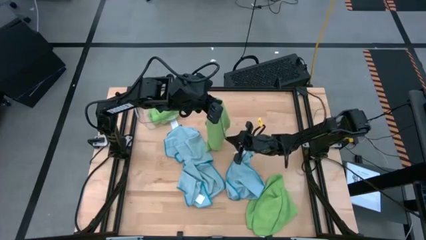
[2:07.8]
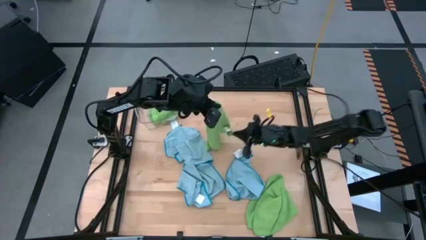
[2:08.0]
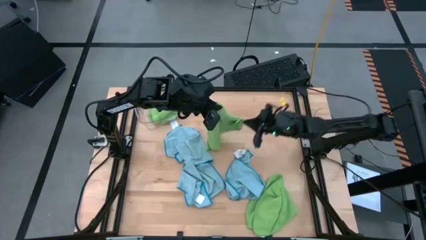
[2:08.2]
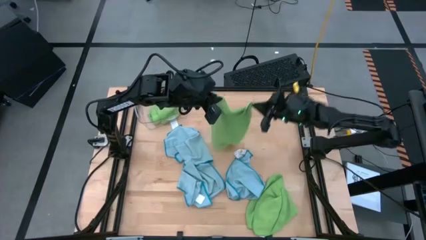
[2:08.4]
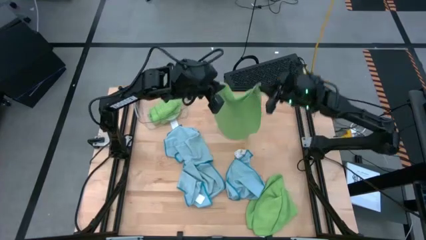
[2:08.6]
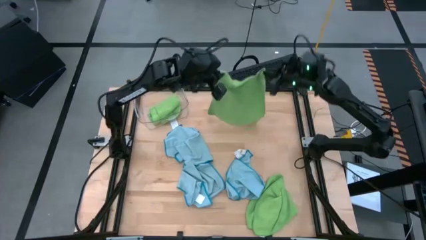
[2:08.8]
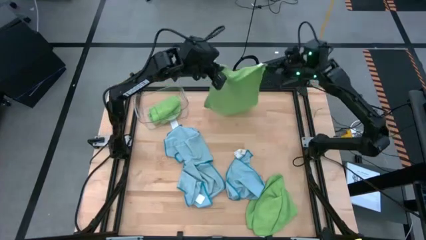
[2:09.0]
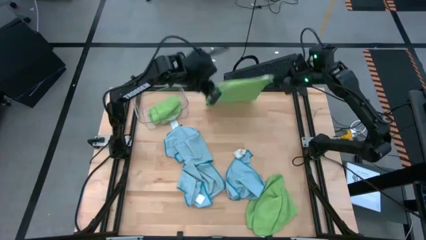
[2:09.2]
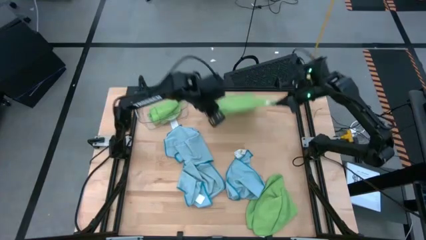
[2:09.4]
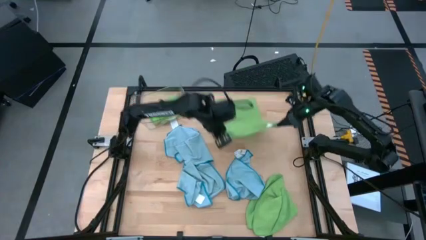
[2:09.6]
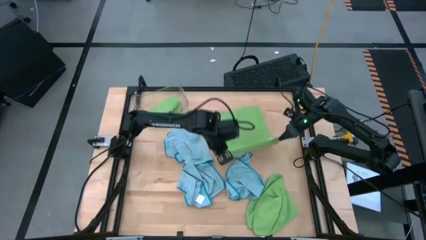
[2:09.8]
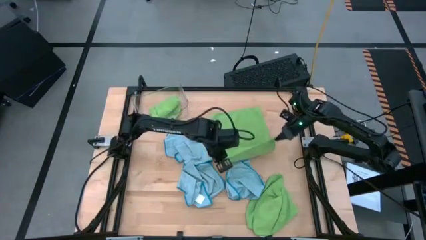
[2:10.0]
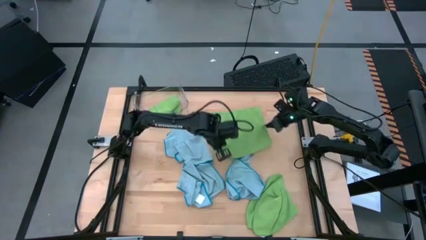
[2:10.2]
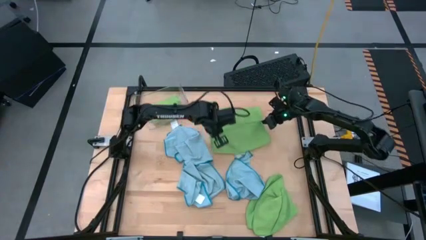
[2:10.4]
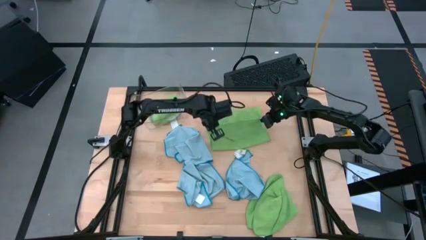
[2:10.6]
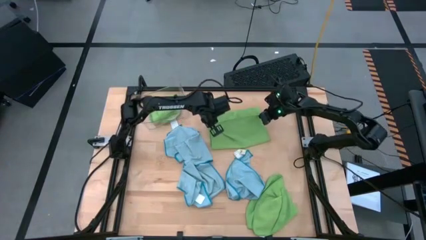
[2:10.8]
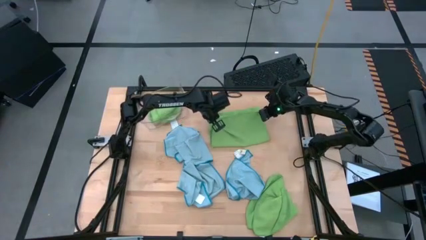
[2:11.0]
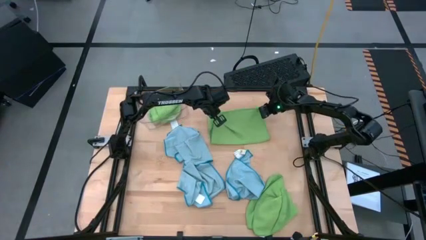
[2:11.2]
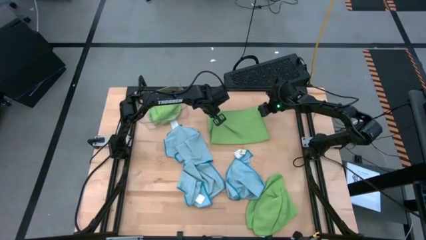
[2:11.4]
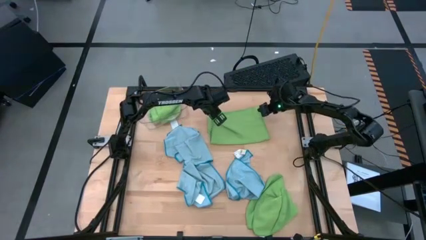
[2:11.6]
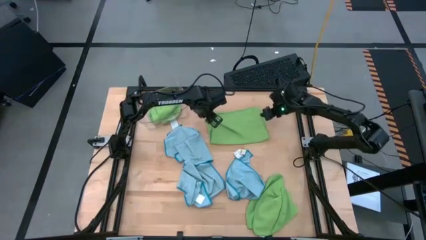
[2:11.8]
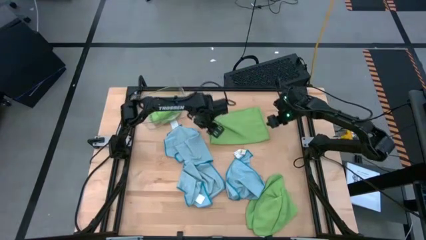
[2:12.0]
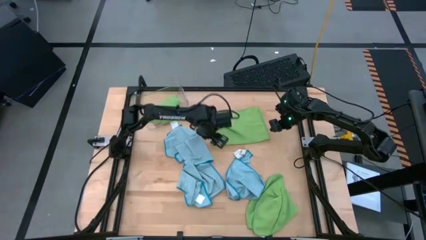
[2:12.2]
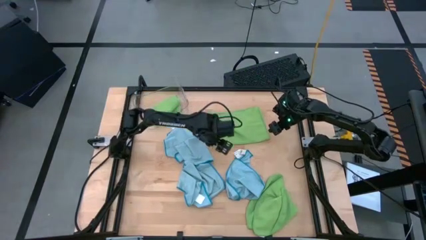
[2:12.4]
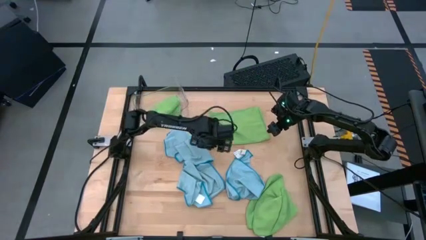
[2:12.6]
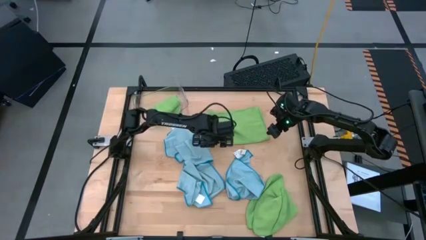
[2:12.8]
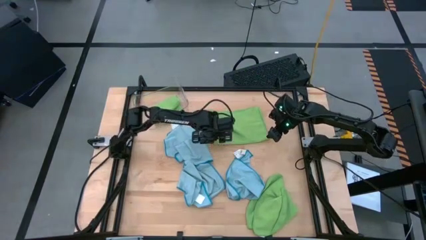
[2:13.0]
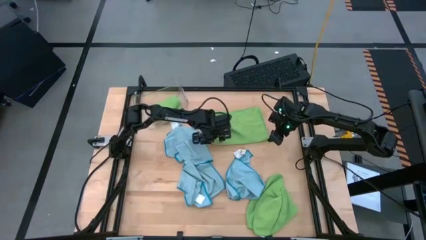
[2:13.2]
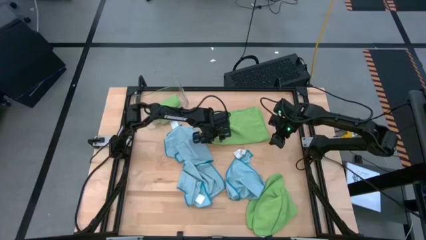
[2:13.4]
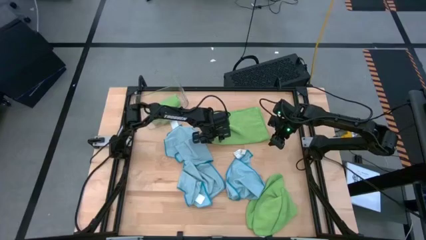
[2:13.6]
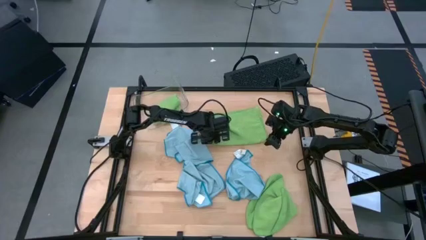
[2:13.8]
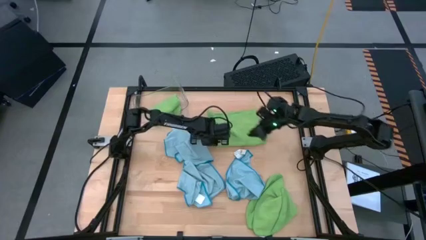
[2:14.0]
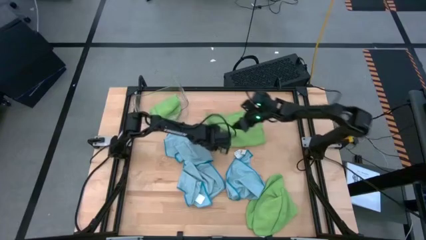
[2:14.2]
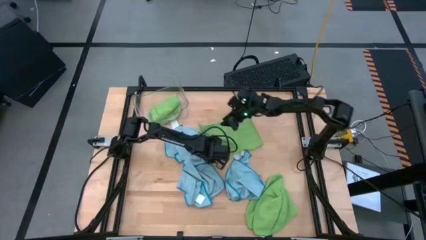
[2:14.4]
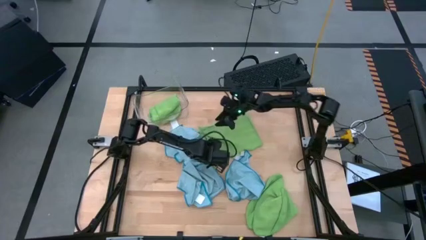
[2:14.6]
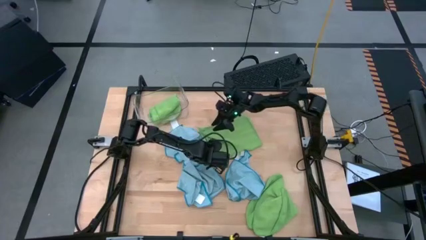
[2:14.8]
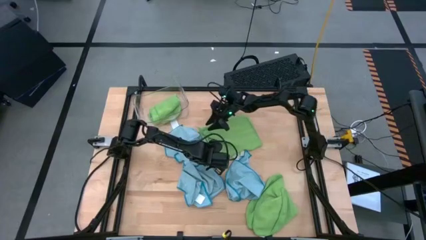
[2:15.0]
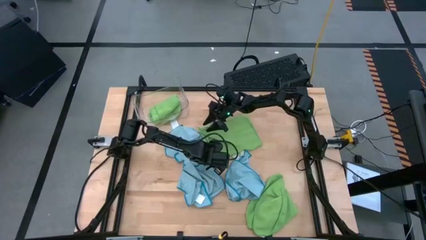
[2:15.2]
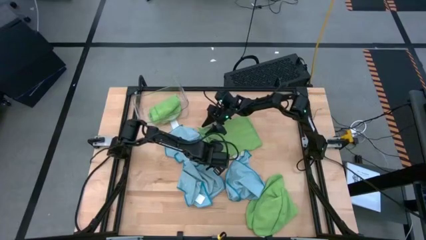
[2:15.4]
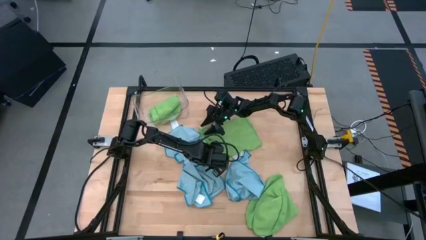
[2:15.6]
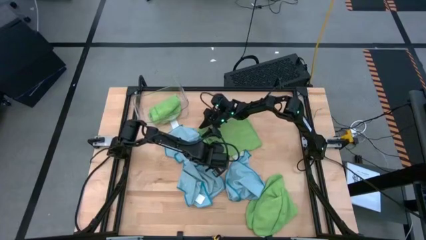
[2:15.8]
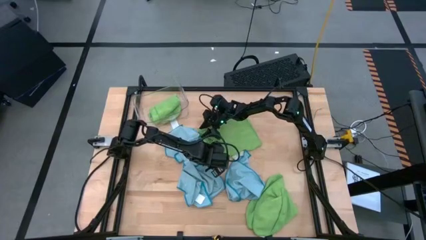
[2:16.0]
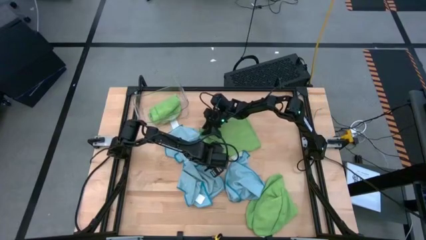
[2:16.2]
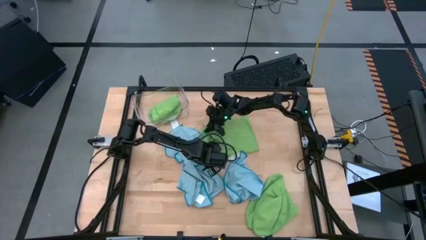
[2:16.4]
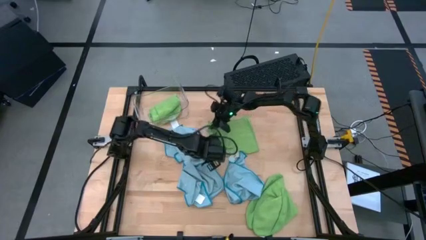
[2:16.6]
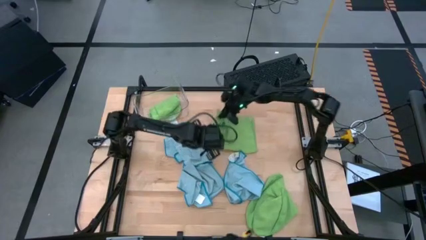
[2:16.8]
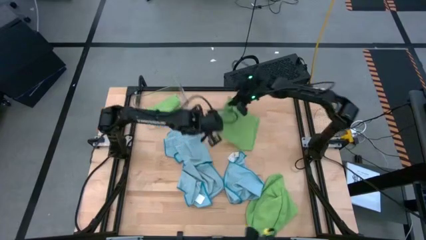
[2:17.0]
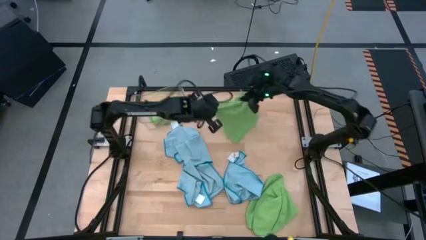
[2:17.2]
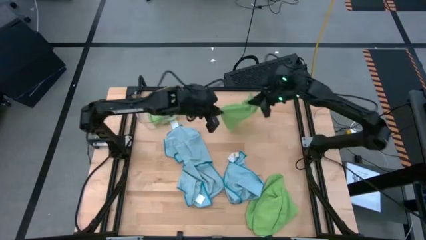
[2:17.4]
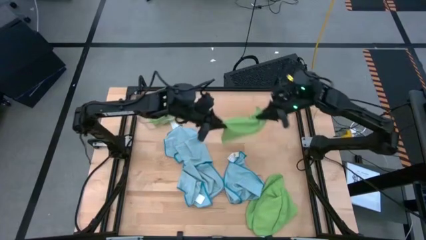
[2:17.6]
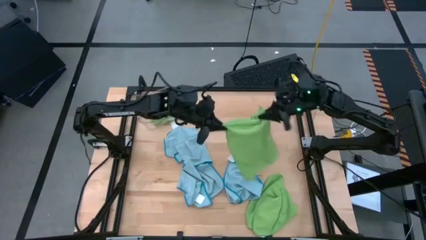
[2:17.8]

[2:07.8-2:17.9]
Task: Fold microfiber towels
Fold the left green microfiber cloth

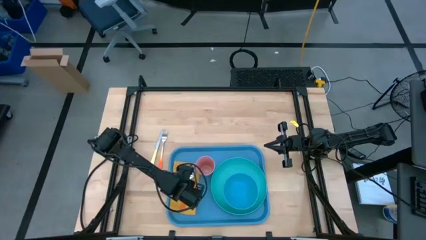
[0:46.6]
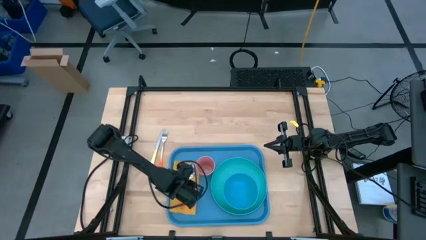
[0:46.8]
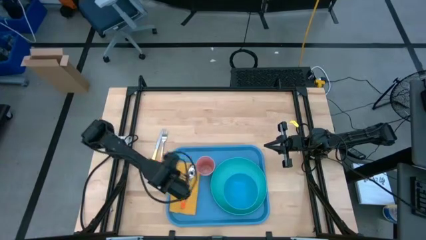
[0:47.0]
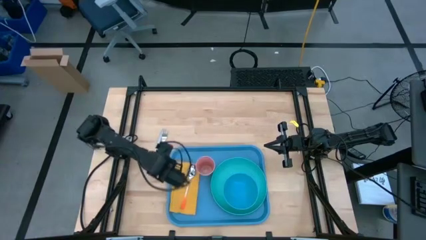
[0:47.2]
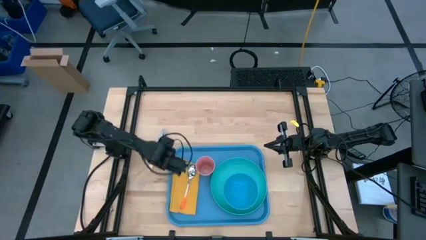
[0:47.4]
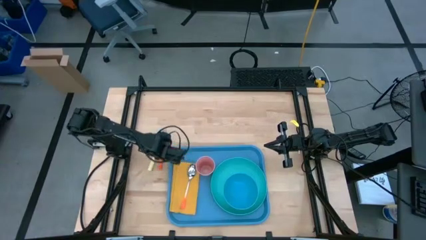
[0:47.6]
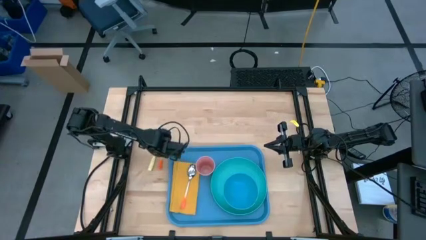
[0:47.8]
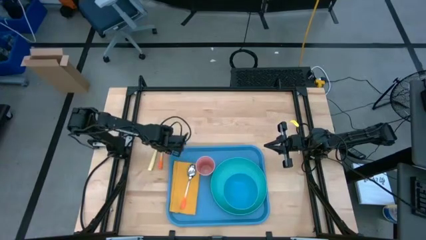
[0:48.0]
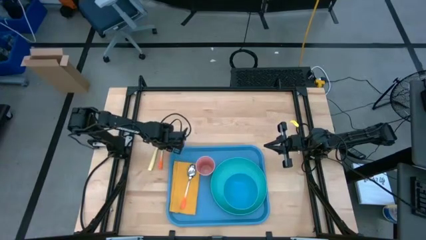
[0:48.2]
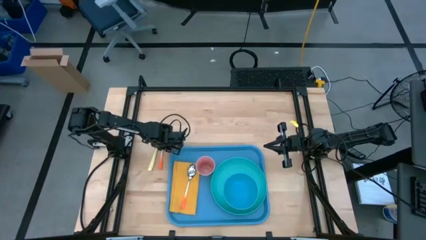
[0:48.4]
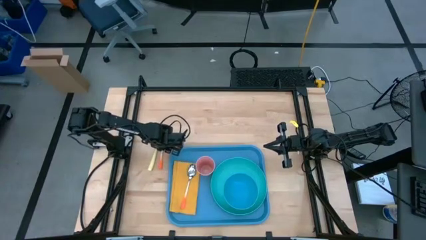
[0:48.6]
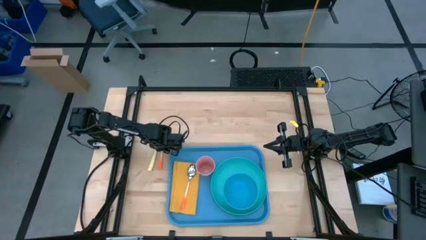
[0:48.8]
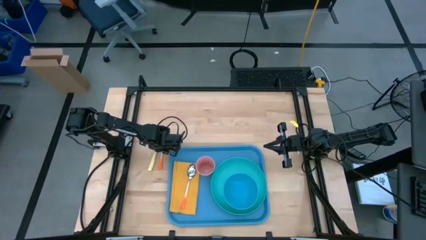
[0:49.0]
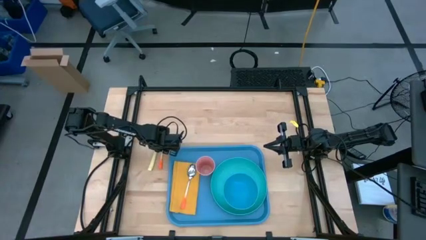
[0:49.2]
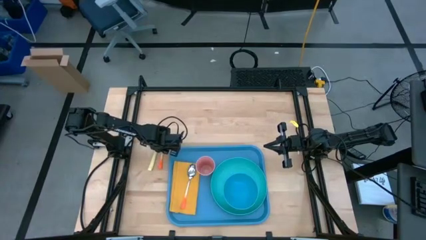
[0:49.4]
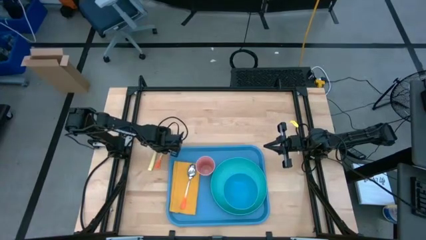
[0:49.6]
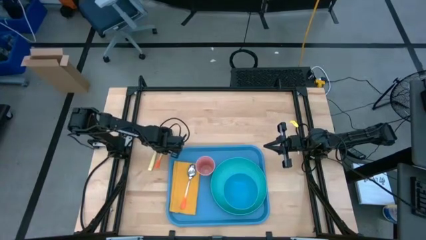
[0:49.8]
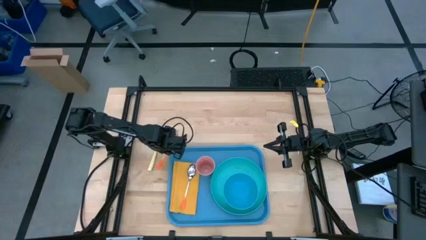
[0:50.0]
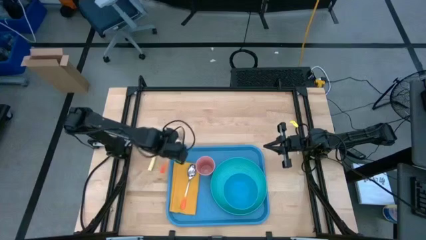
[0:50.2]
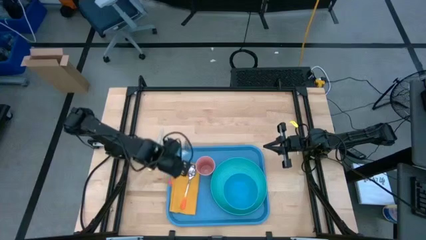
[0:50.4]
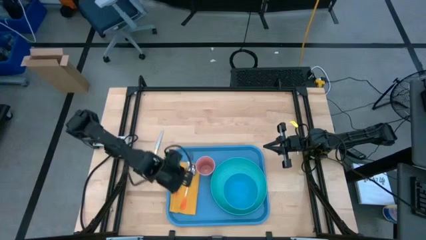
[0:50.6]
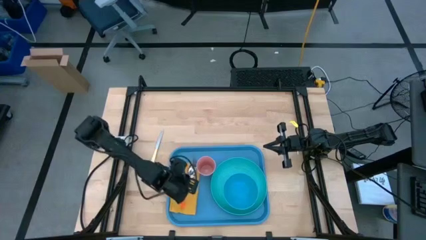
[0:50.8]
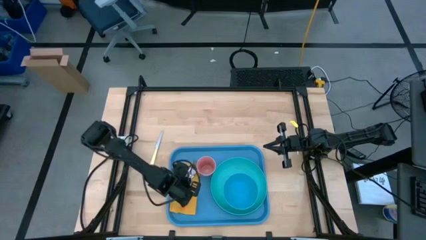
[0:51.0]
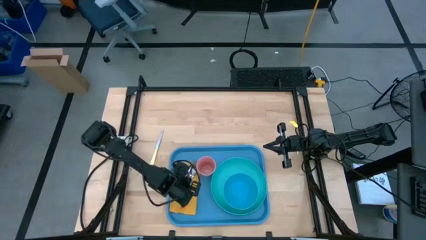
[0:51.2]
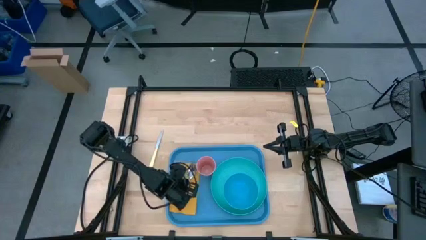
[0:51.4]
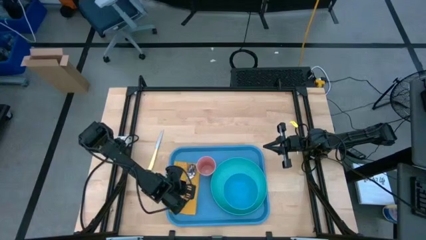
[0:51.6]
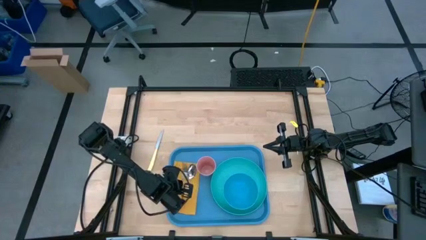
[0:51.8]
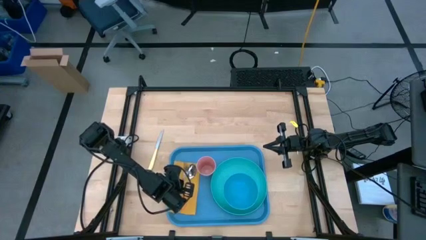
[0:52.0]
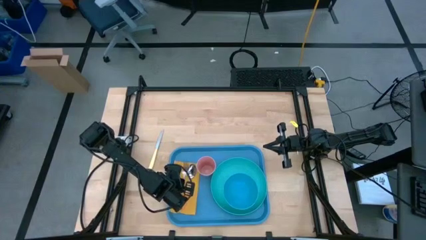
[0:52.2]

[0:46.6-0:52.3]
Task: Set up tray
Put the orange fork to the left of the orange spoon on top of the yellow table napkin on the blue serving tray
